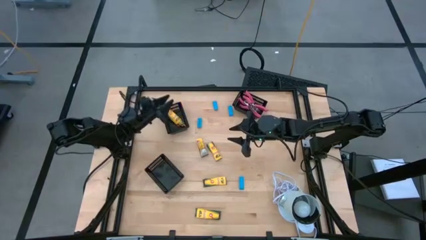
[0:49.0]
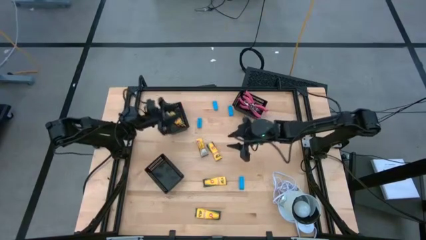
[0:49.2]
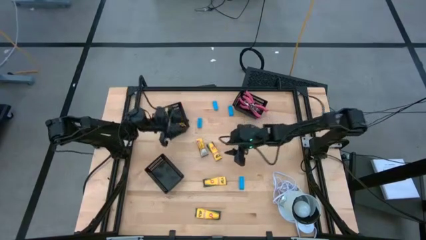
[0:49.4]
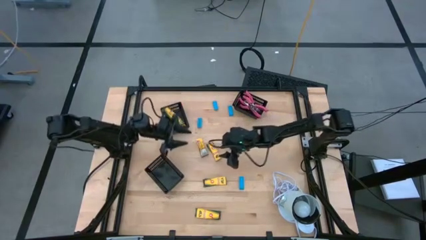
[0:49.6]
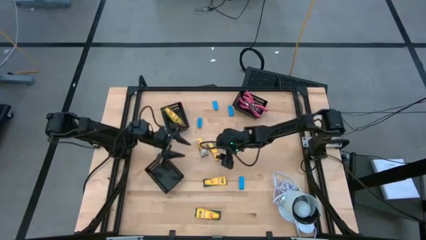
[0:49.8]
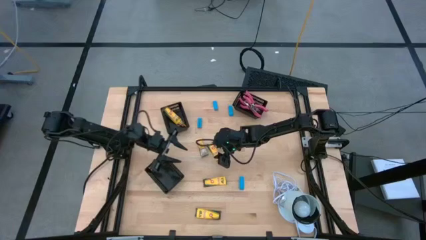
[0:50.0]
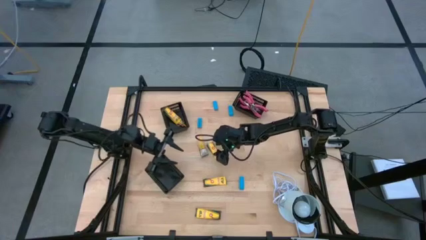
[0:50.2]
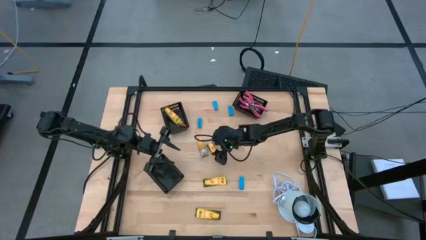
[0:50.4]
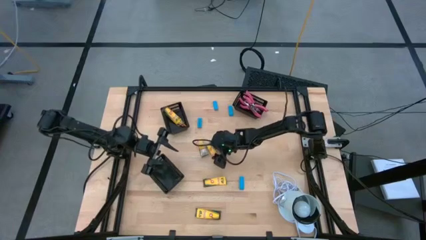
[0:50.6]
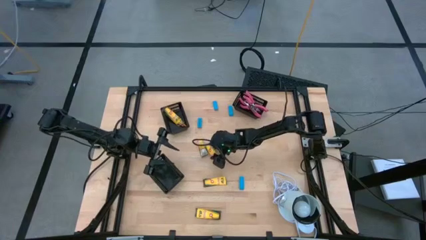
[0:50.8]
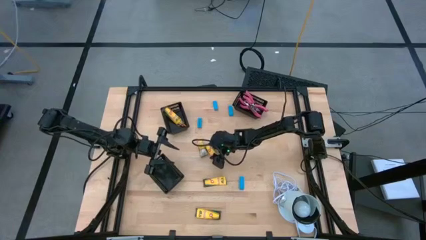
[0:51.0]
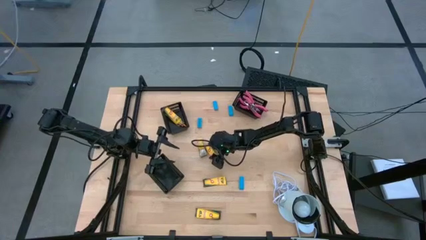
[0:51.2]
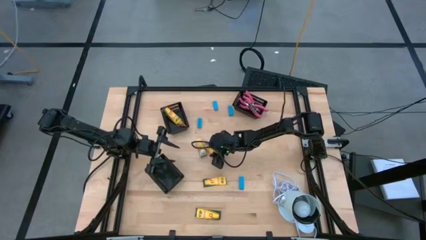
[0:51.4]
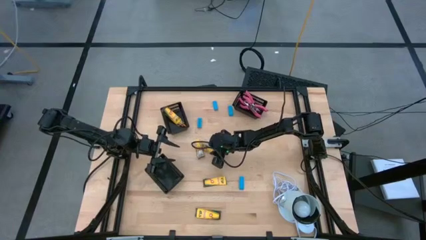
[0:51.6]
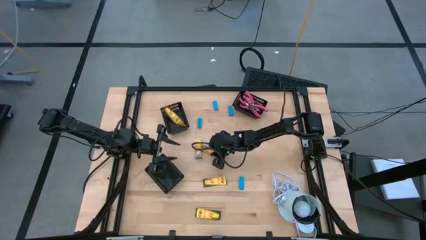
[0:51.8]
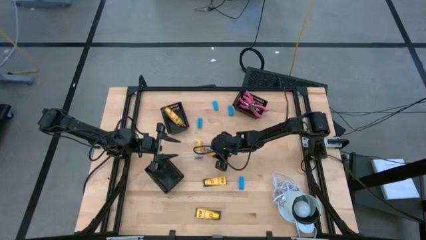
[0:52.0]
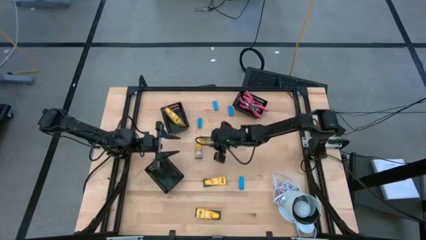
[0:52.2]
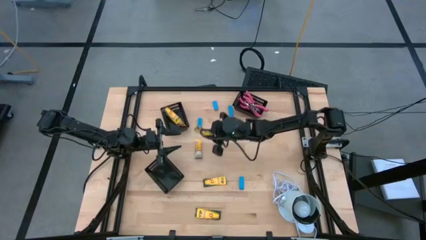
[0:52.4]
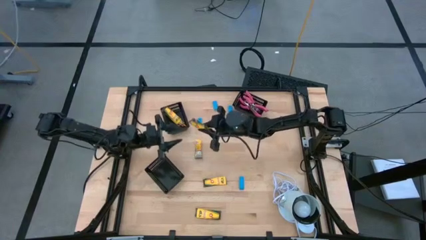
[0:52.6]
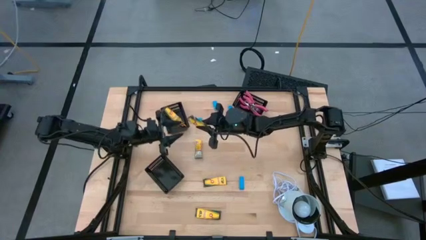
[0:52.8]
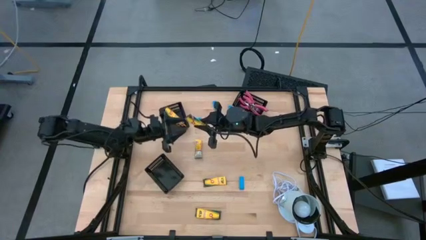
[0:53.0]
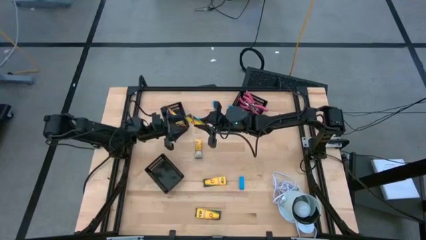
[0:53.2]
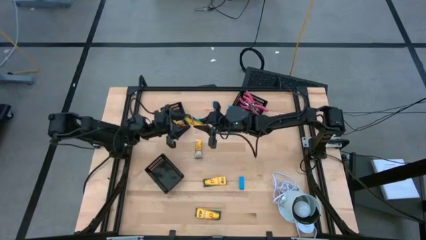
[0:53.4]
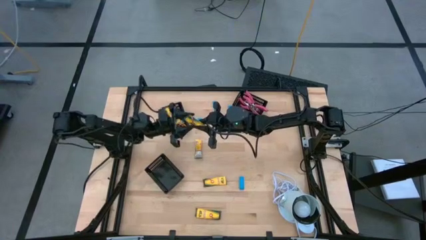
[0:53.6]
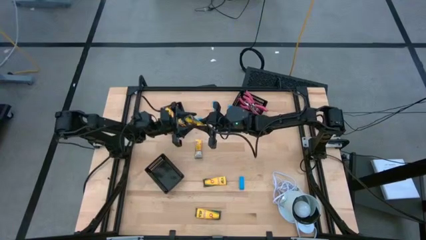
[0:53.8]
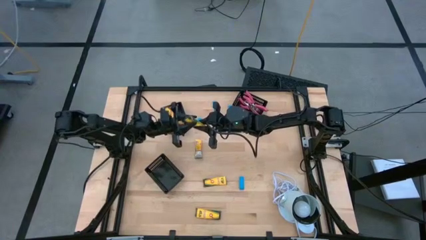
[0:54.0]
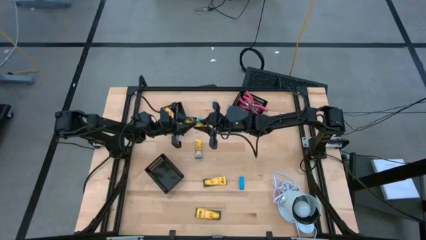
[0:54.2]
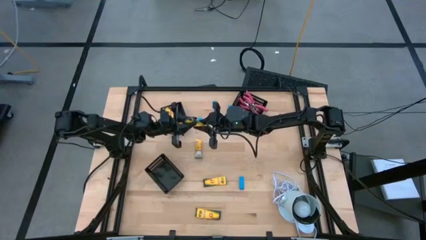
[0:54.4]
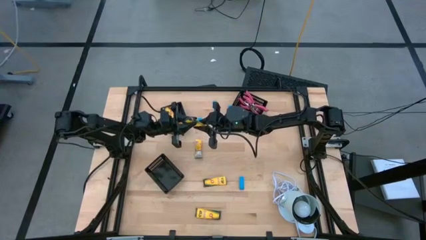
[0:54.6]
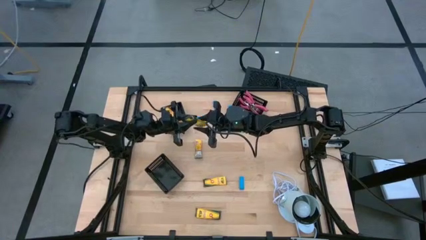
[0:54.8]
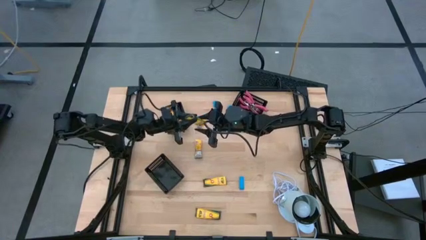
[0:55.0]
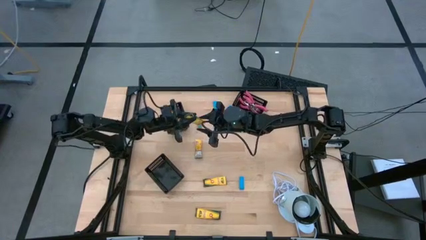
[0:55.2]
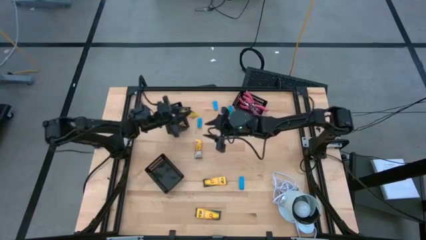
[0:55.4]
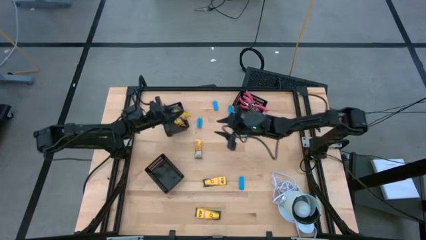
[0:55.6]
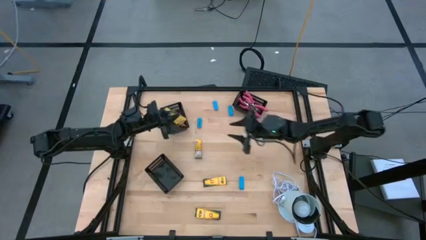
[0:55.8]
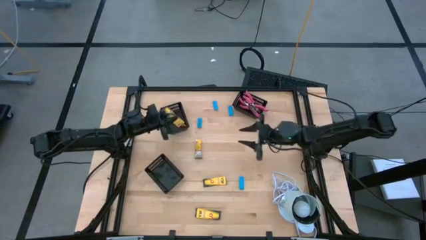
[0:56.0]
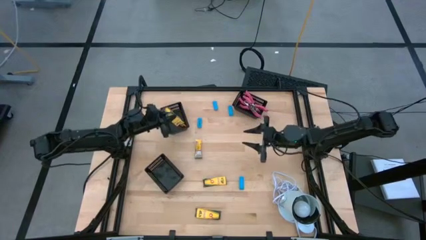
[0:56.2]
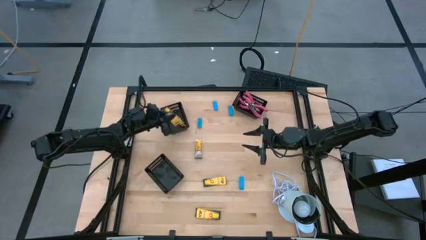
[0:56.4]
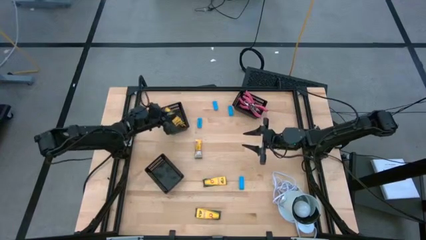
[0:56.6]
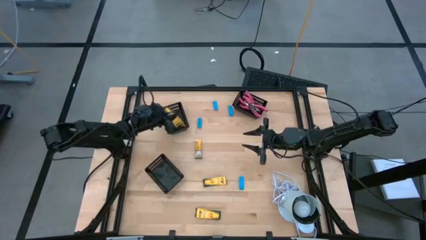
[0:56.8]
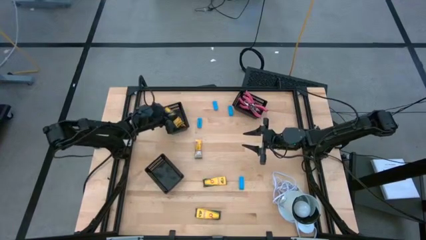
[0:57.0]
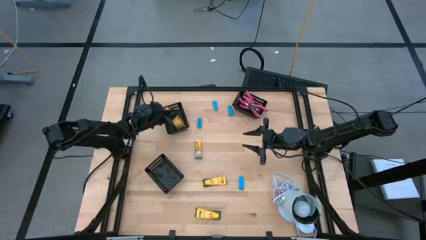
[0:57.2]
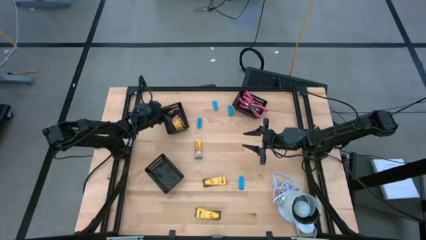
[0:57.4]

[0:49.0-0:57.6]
Task: Pick & Place School Supplies
Put the yellow crayon box into the middle black bin

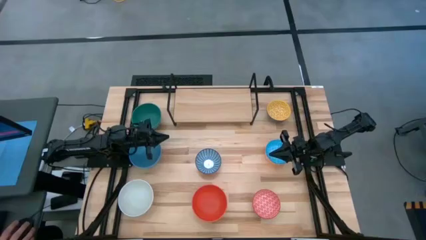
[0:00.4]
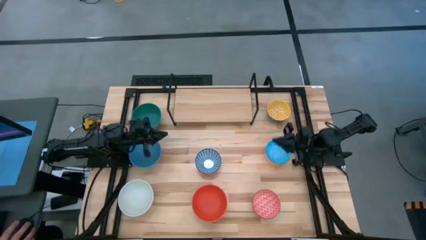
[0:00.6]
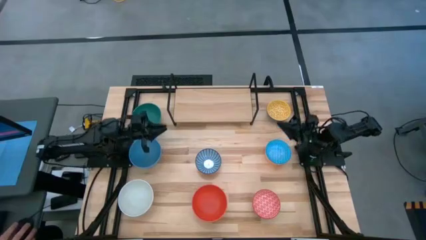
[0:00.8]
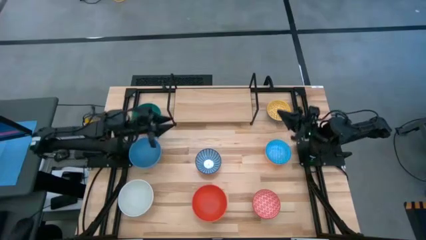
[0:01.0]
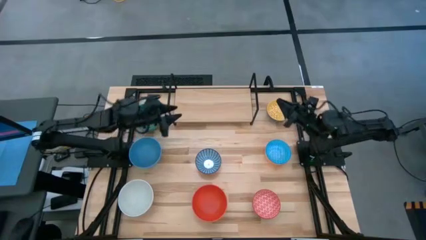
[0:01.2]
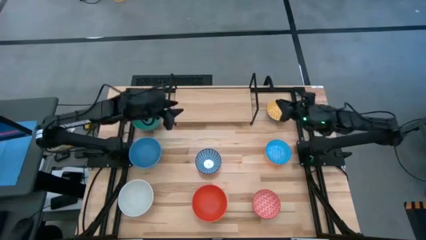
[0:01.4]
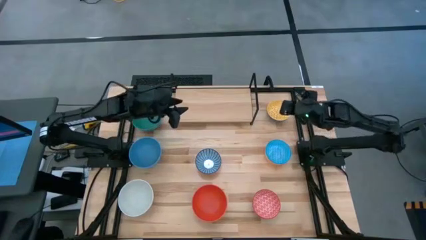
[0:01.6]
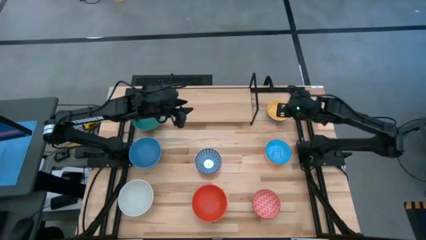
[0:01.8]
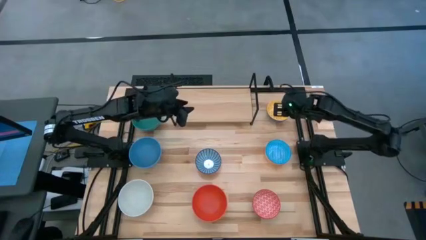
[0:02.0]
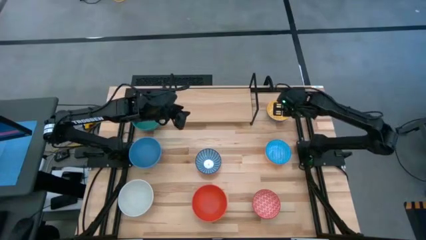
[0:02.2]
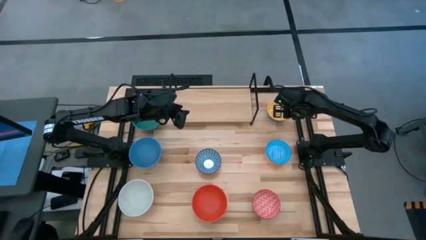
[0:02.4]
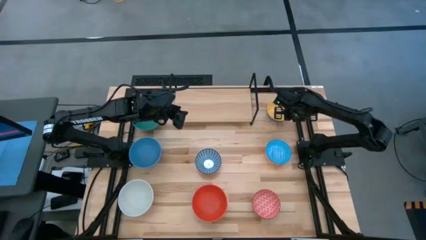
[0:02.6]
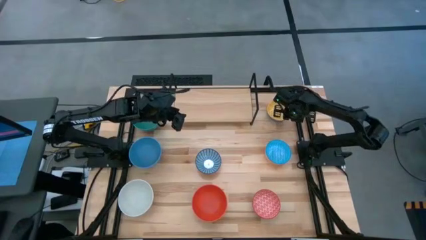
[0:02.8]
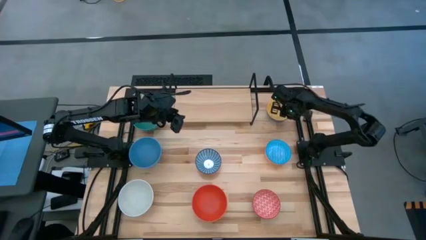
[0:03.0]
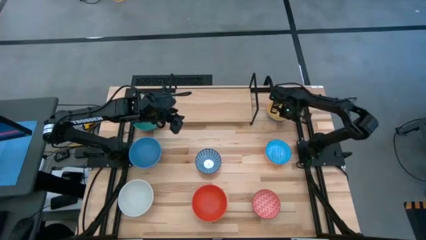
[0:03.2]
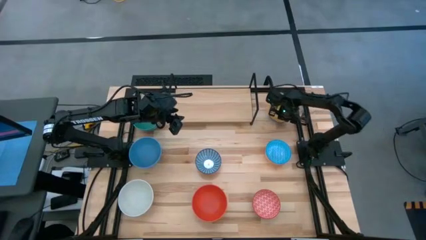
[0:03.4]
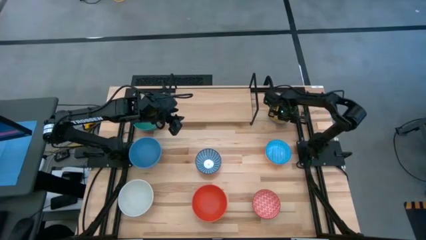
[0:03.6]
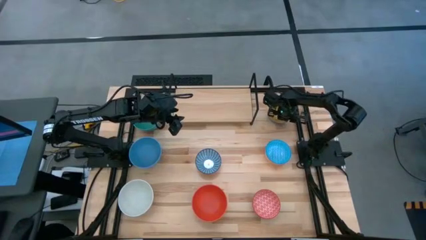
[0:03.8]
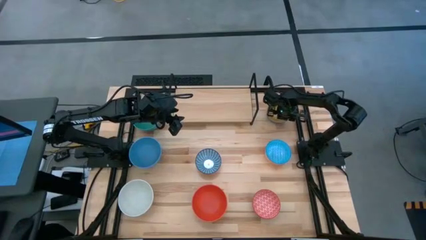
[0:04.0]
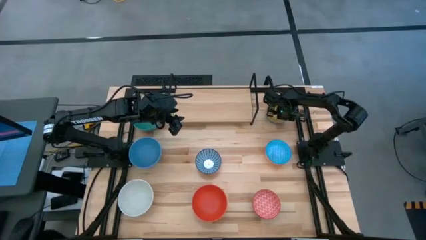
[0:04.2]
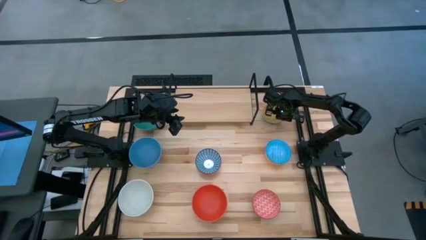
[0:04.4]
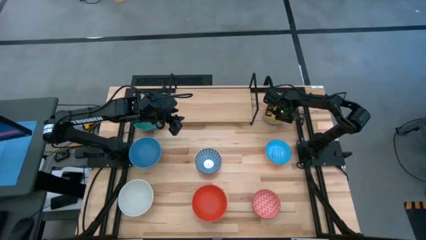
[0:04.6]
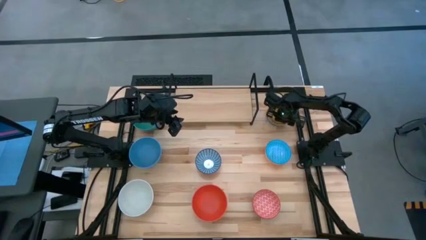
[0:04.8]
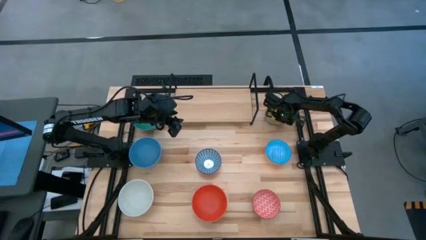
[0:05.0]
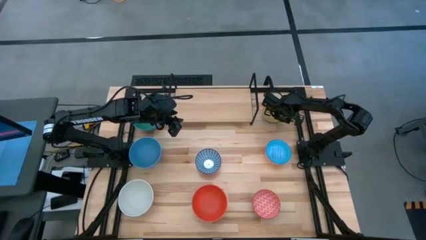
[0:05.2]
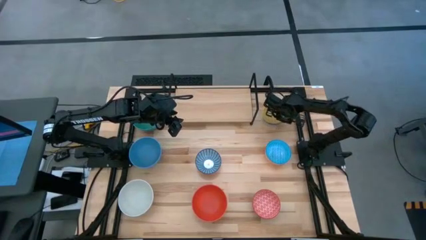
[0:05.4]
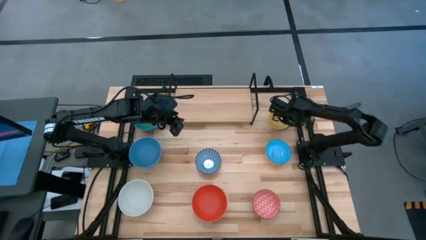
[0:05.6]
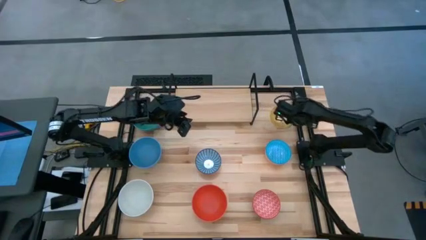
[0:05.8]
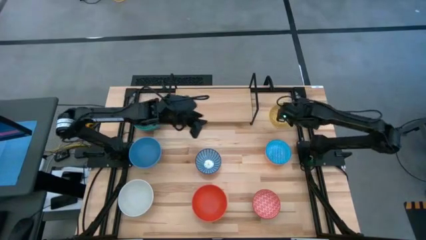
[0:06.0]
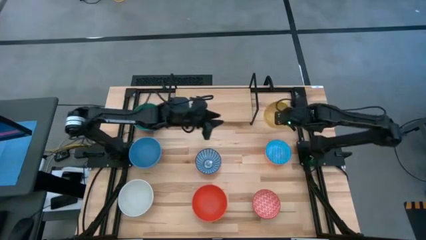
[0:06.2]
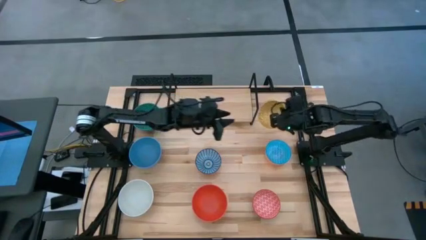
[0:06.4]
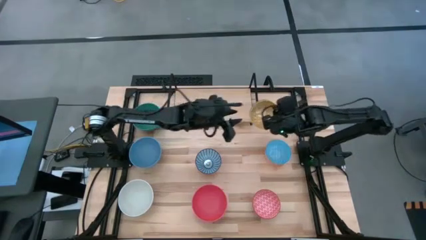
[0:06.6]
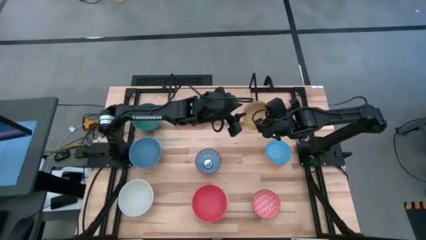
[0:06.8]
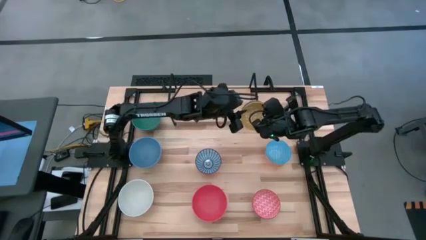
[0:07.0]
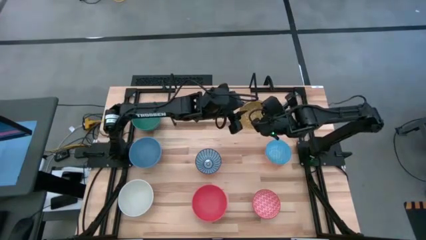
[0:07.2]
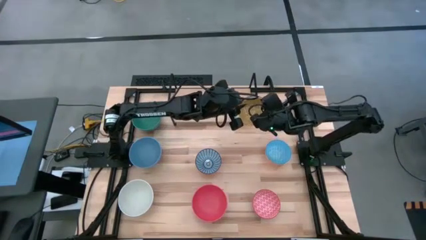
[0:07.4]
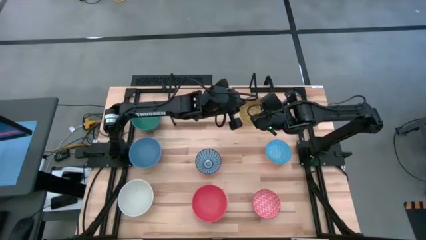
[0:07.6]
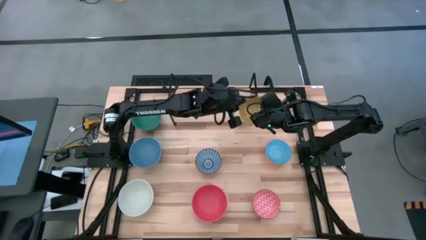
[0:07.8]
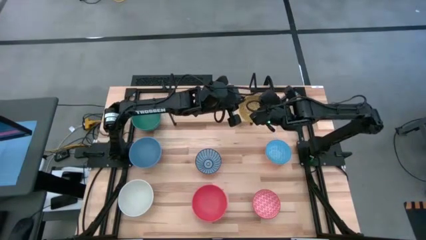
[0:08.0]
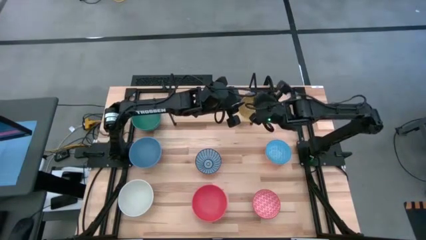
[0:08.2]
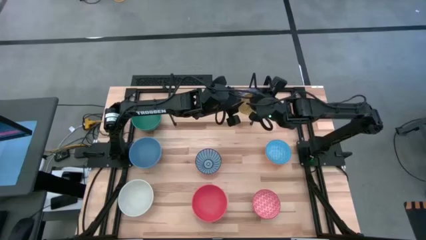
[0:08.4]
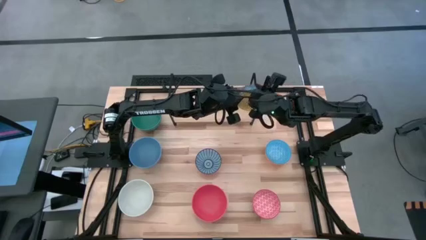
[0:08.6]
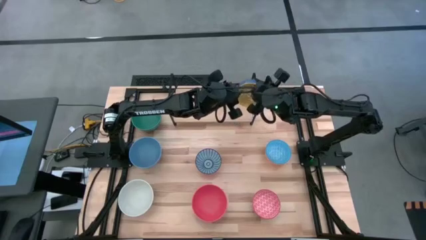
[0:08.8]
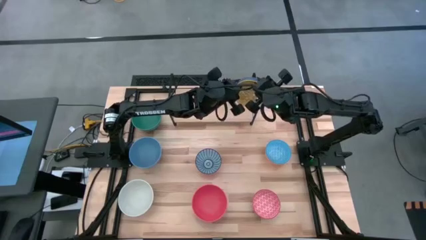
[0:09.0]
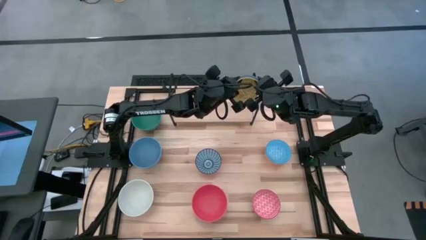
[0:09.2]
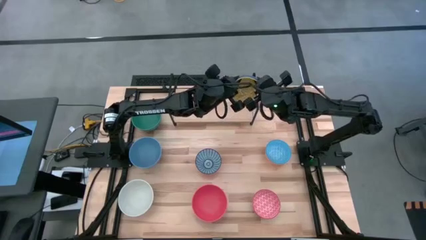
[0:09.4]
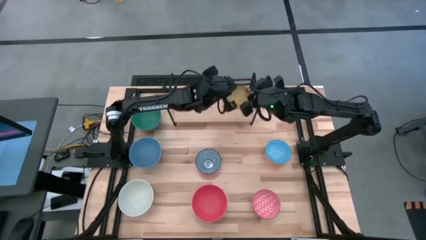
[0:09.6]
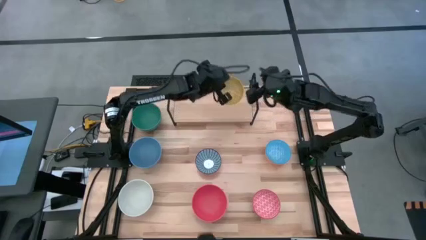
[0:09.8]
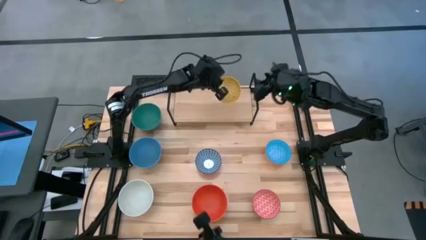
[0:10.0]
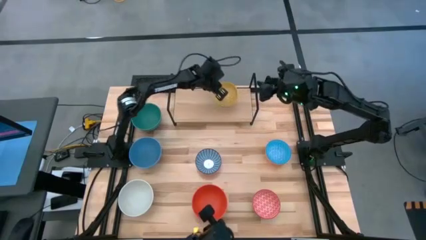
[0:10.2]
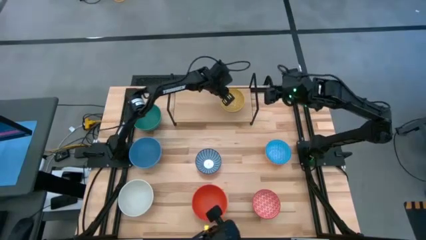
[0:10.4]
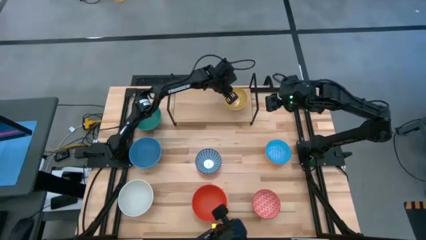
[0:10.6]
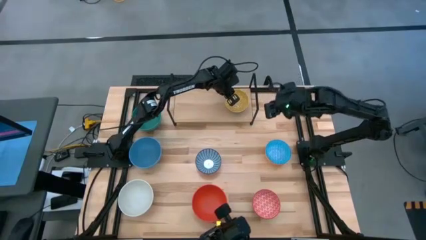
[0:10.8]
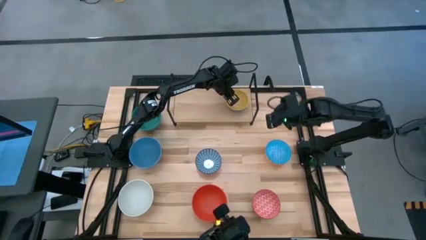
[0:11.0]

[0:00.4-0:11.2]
Task: Place and stack bowls onto a shelf
Put the yellow patterned bowl on the shelf
